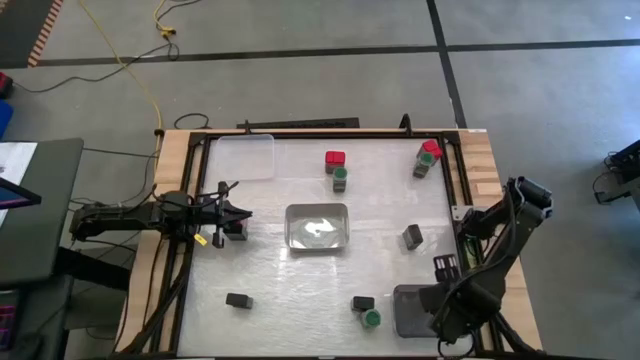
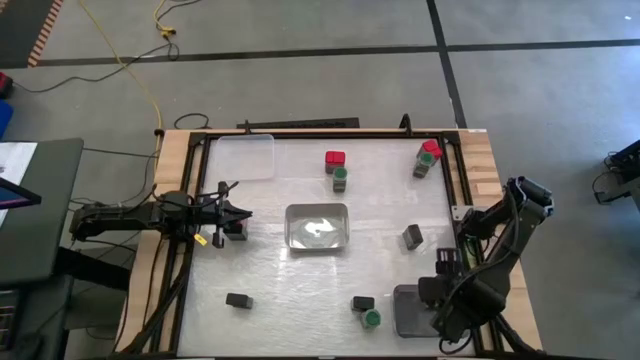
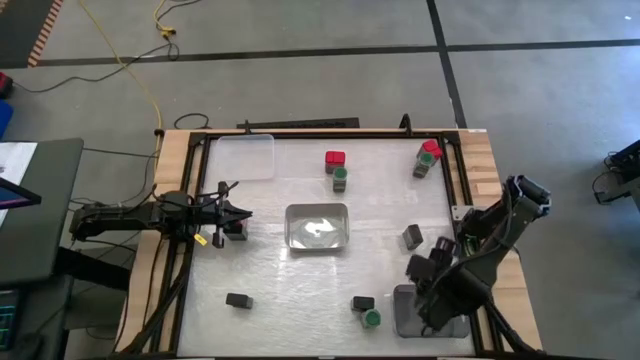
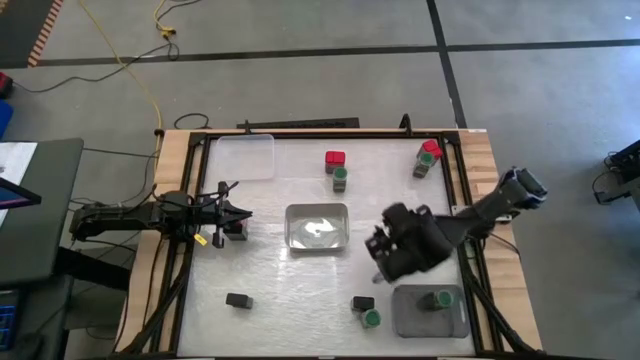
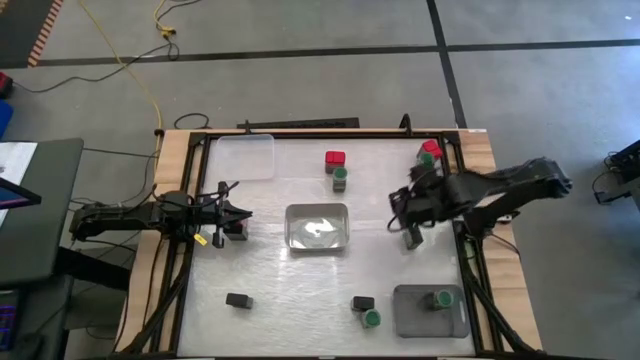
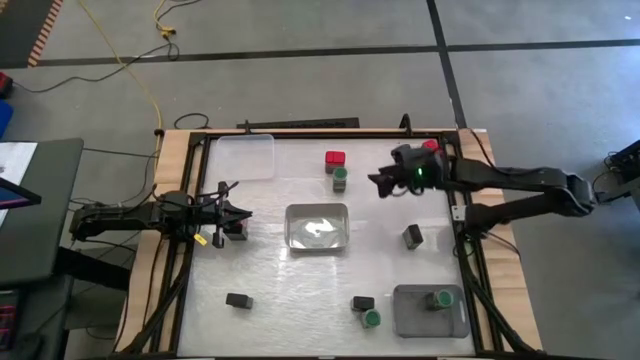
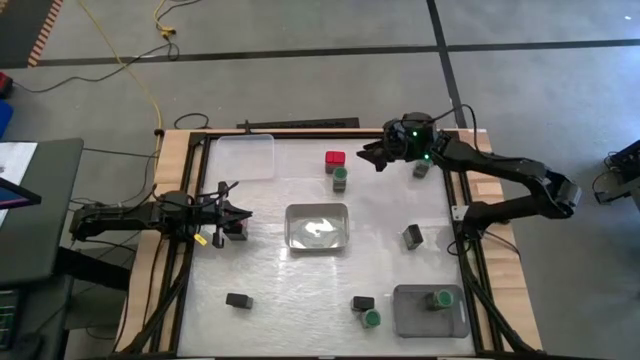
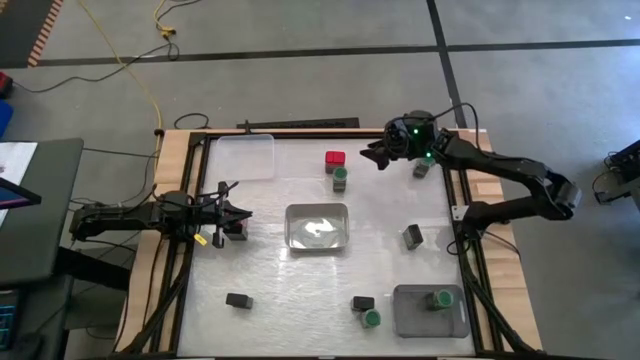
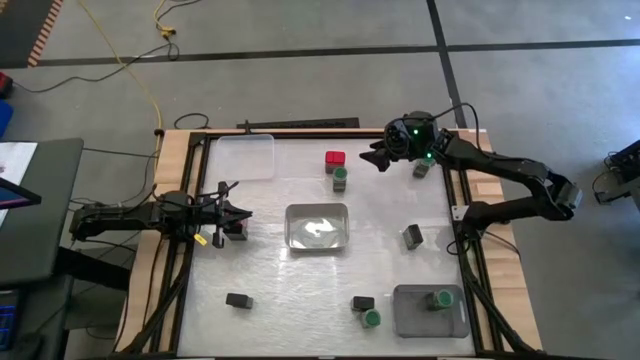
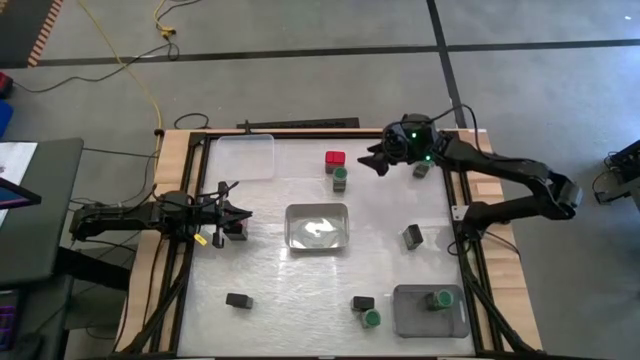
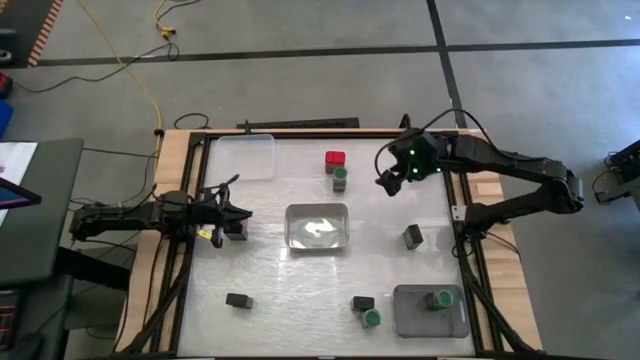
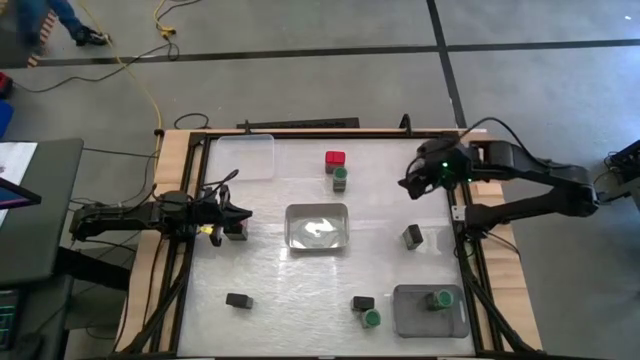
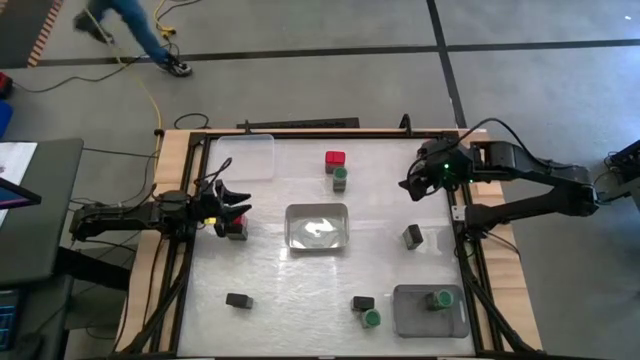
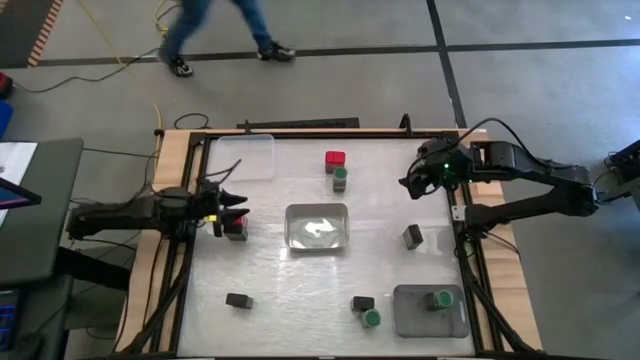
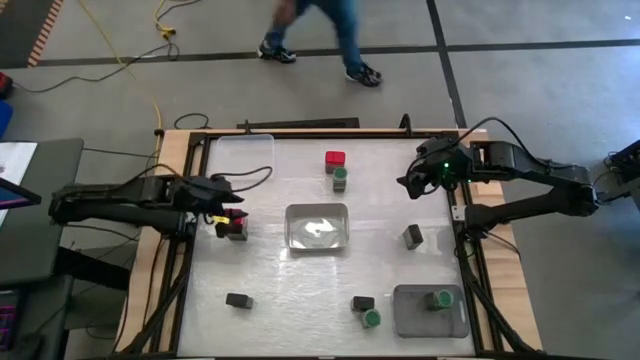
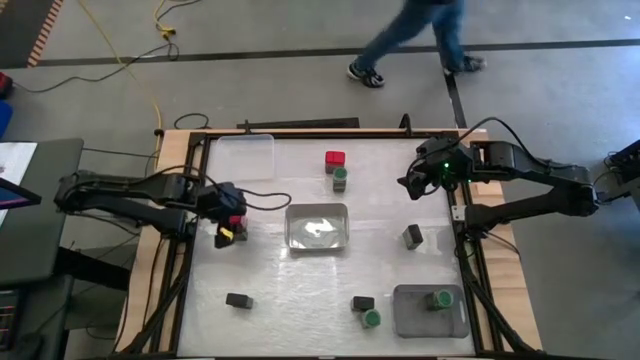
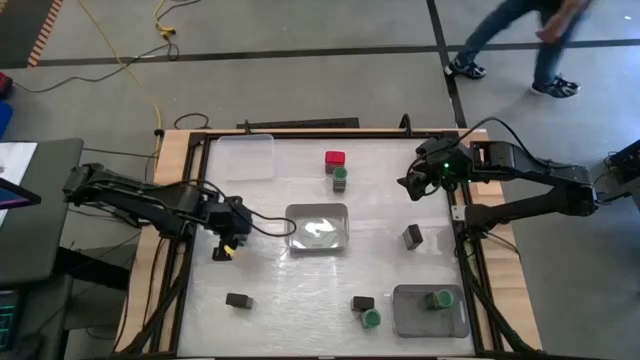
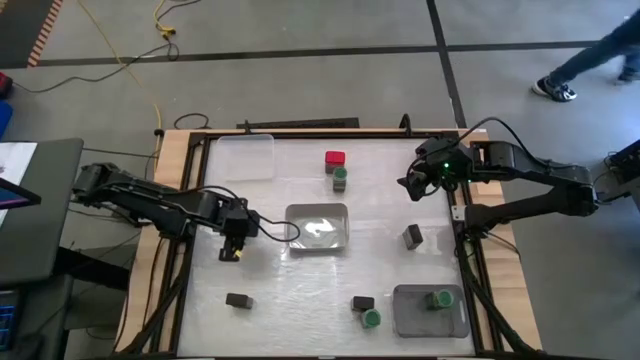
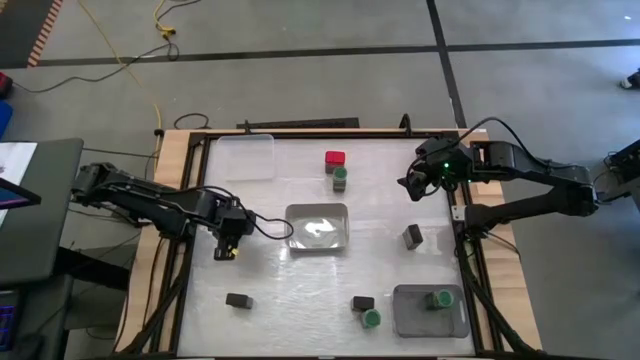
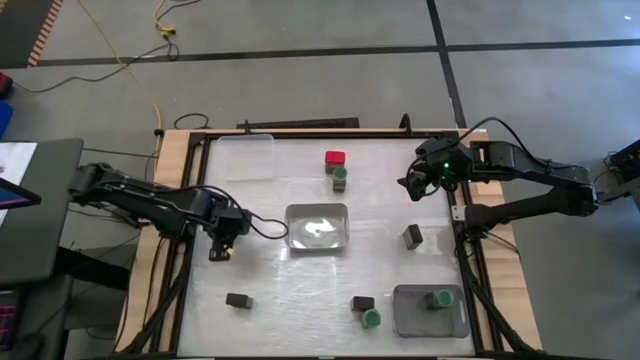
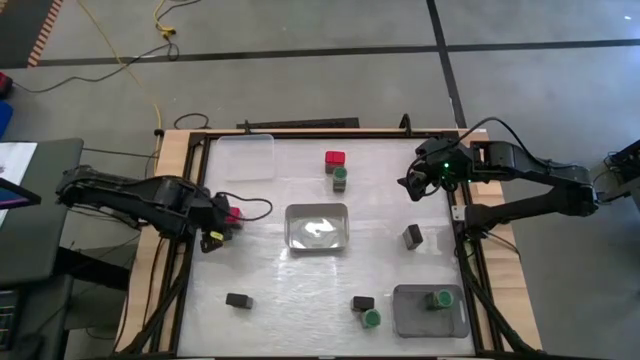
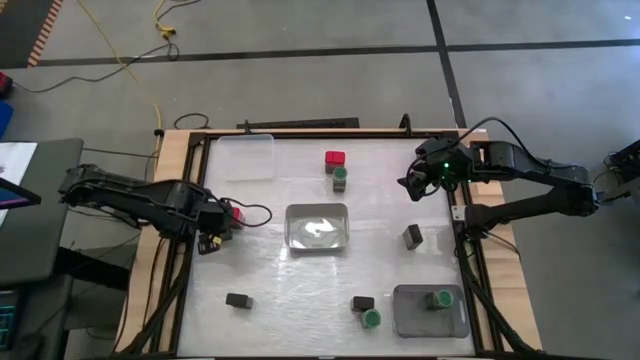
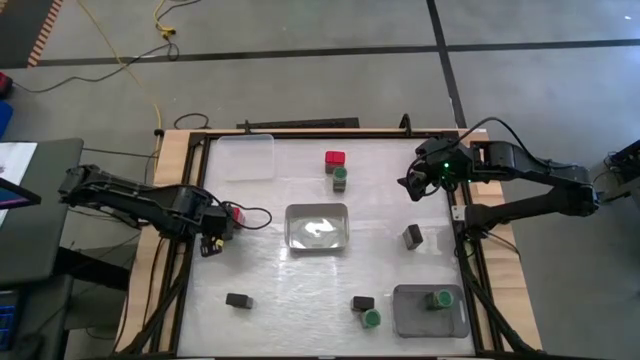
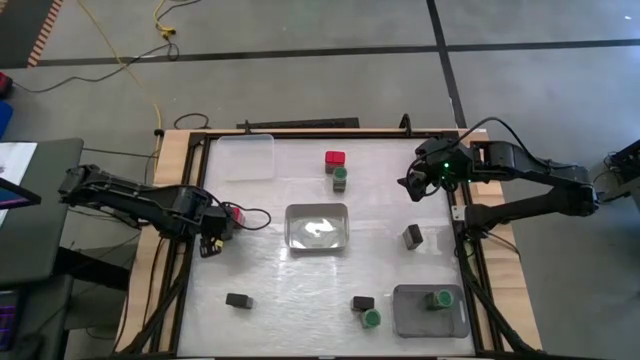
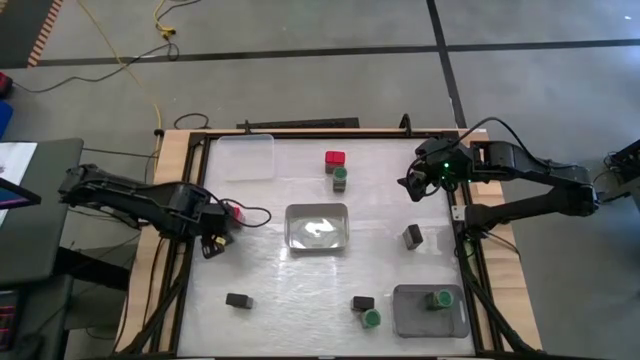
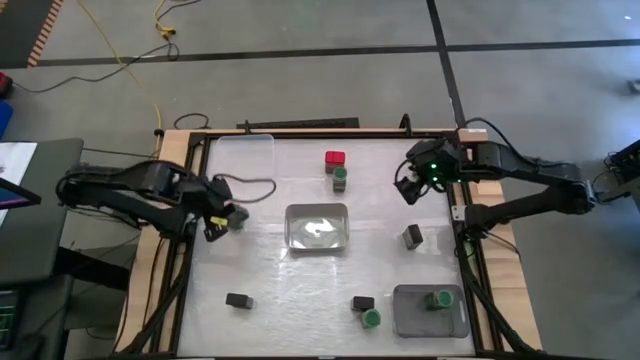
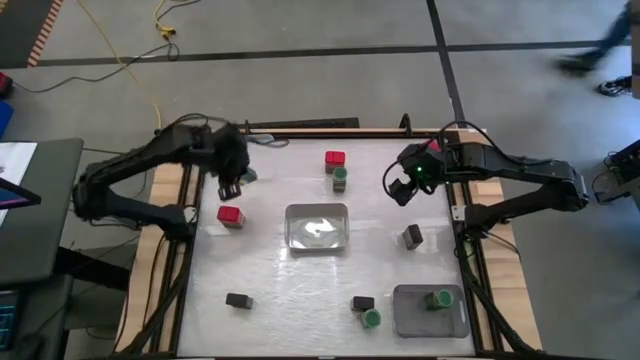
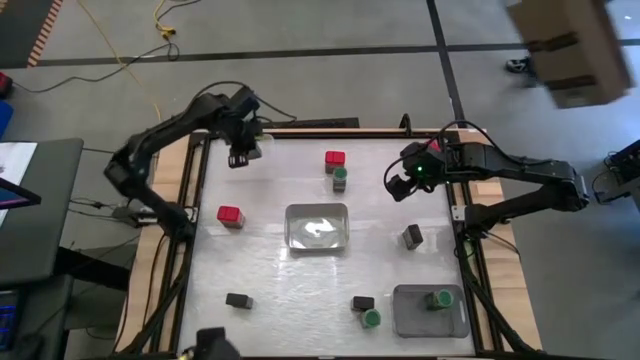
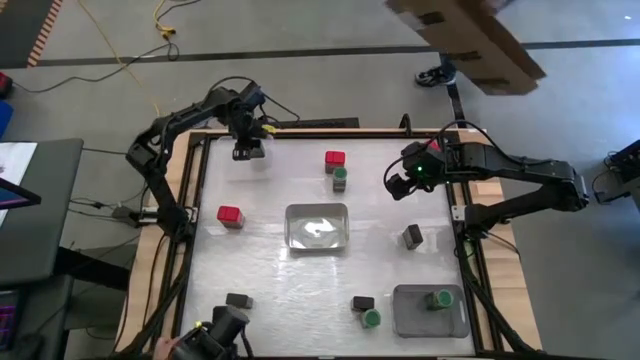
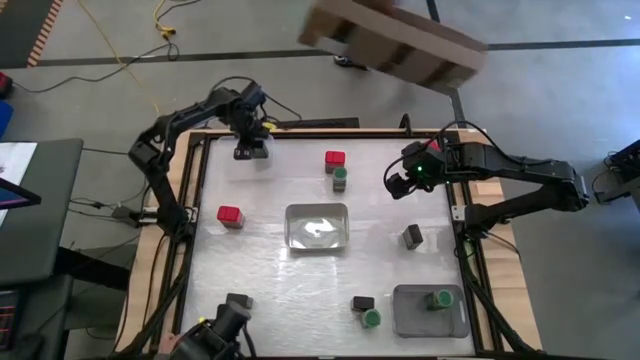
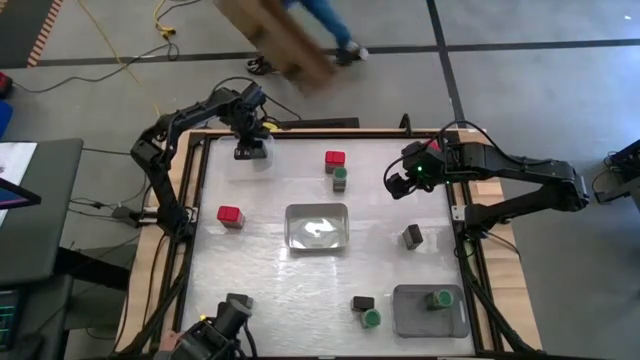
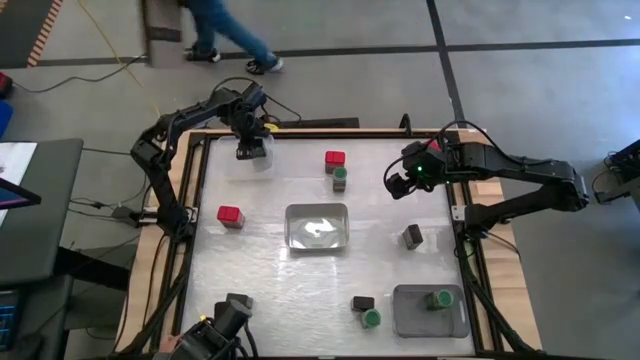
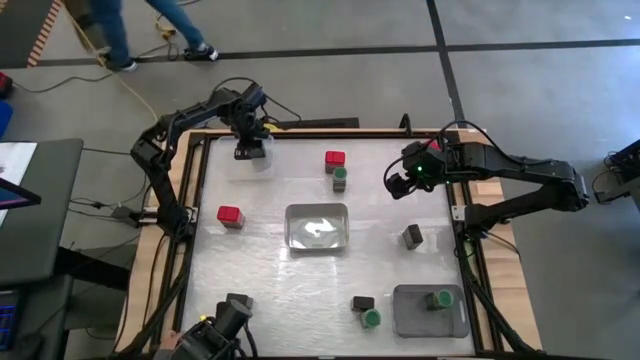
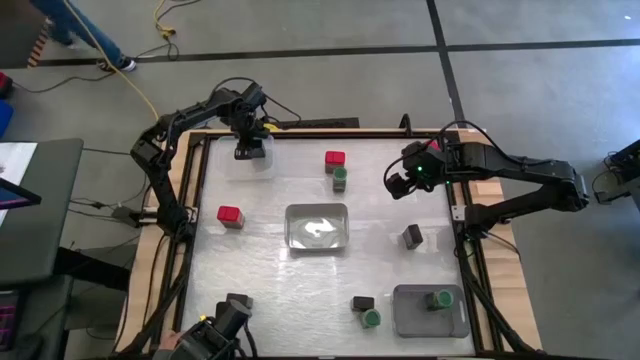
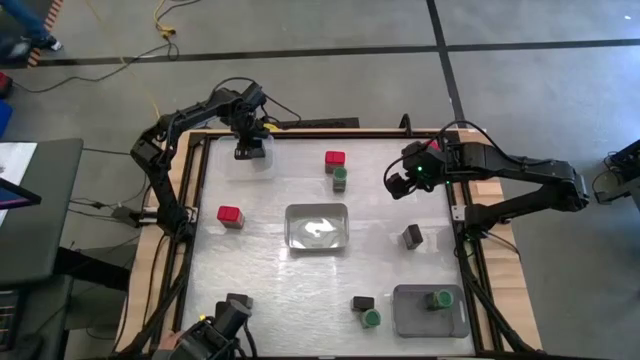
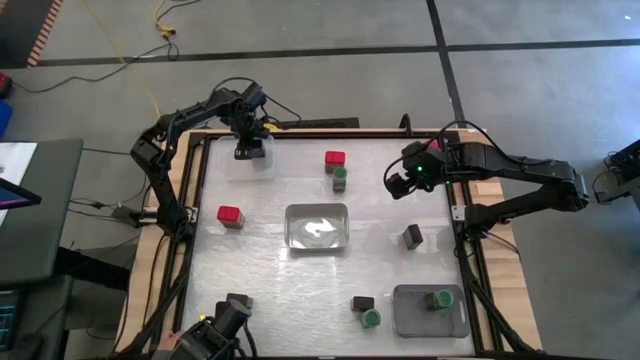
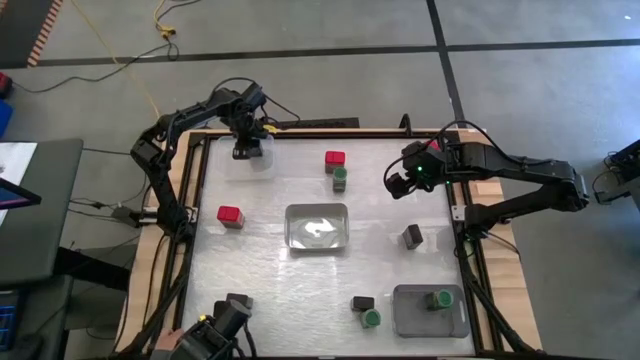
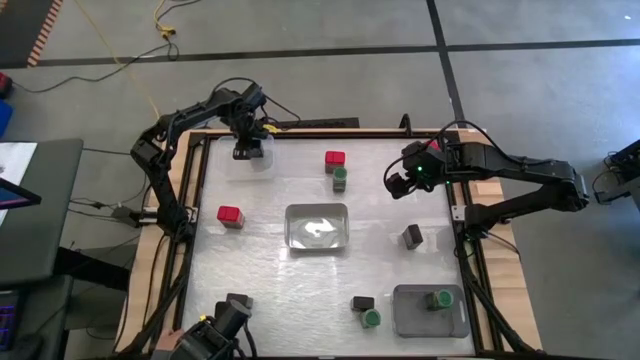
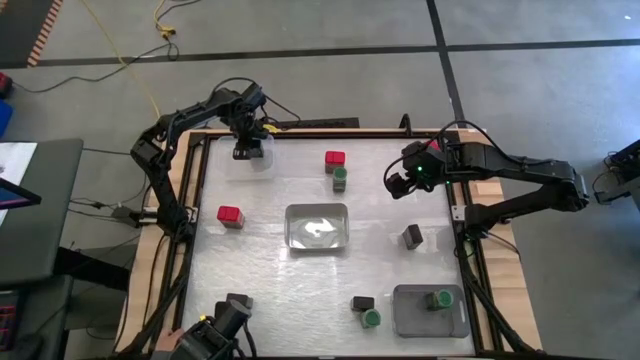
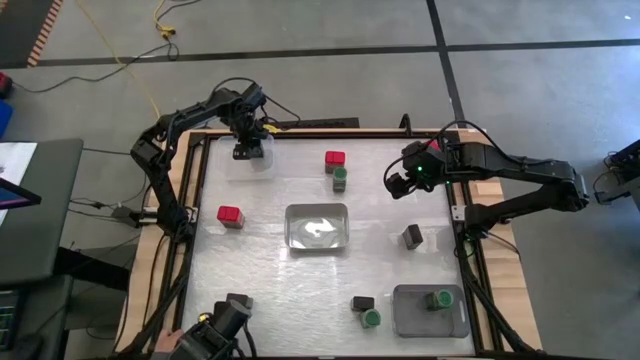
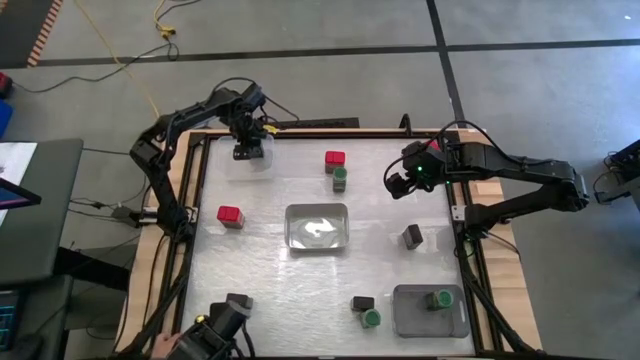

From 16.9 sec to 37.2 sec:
Task: Sort spices by type
Put the top left black seasoning can into the transparent bin

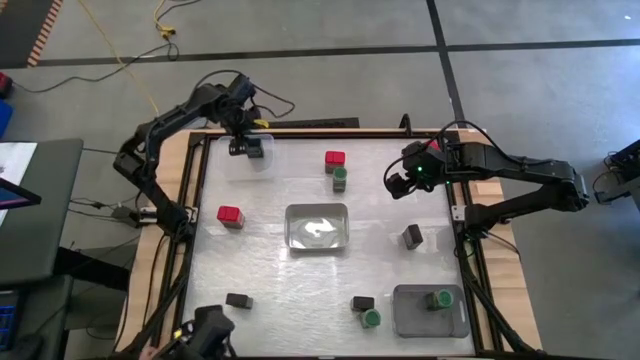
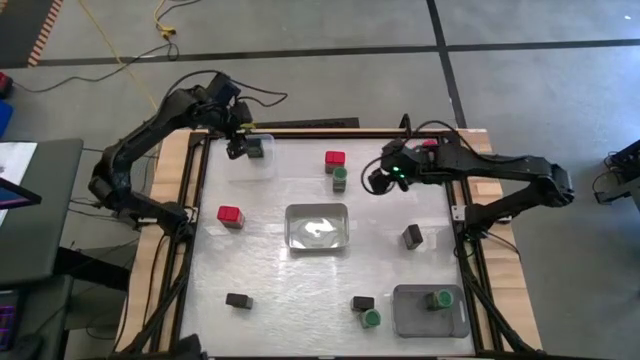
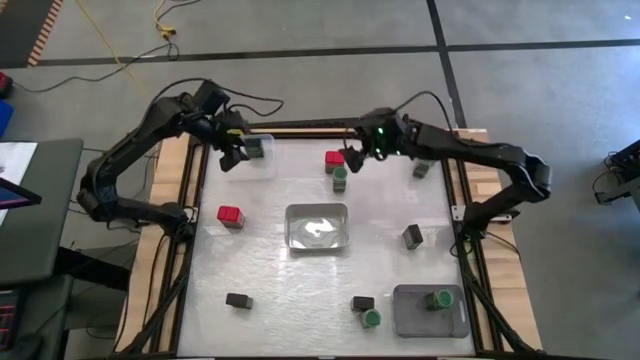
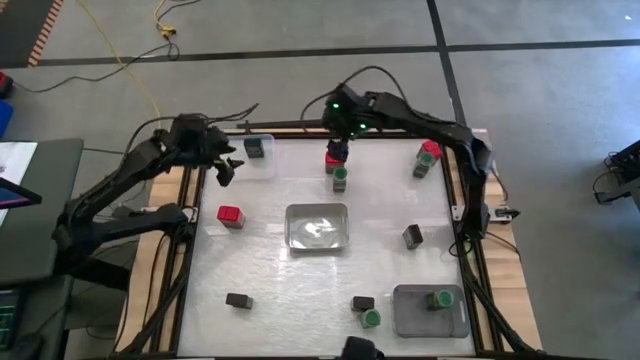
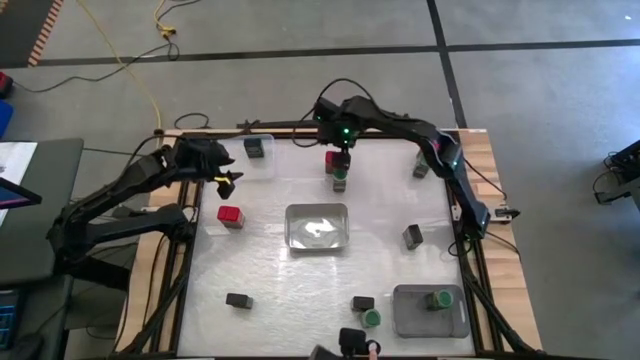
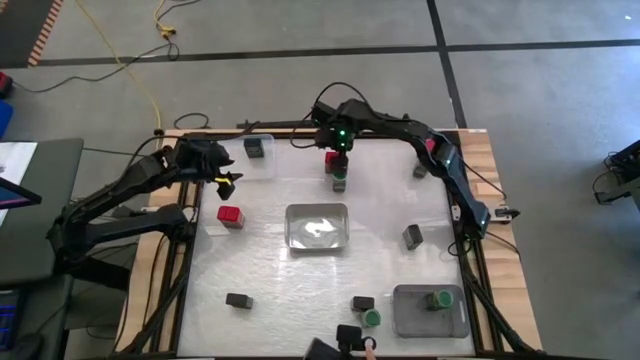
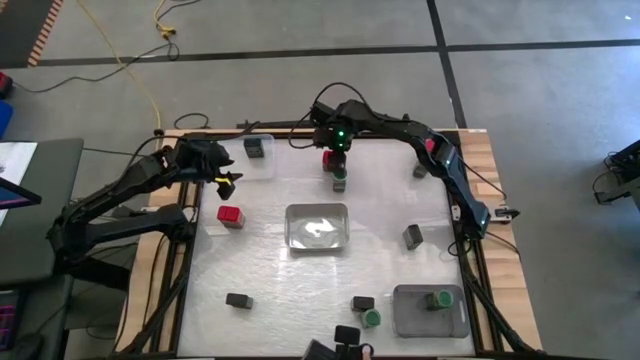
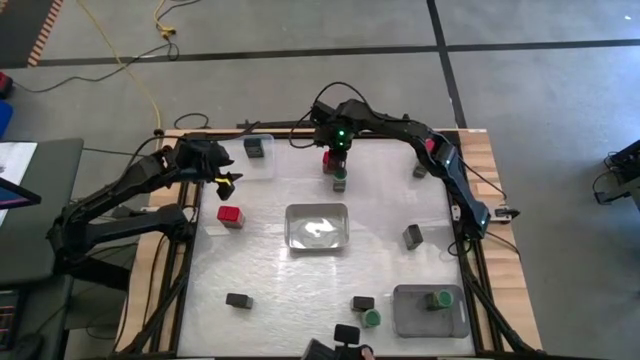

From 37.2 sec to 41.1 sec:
Put the middle red seasoning can into the gray bin
